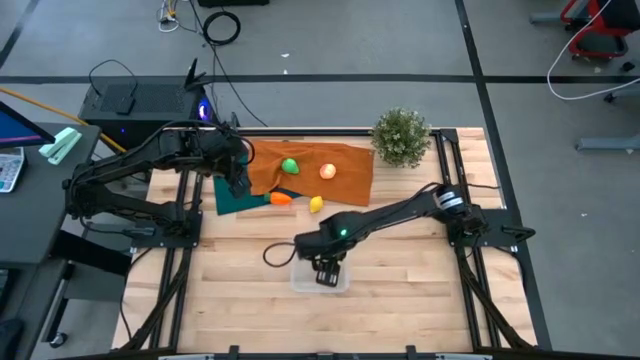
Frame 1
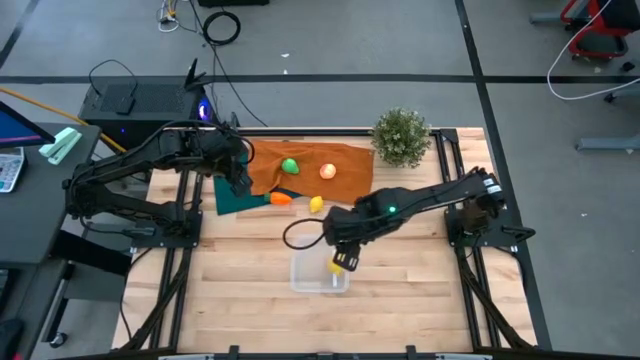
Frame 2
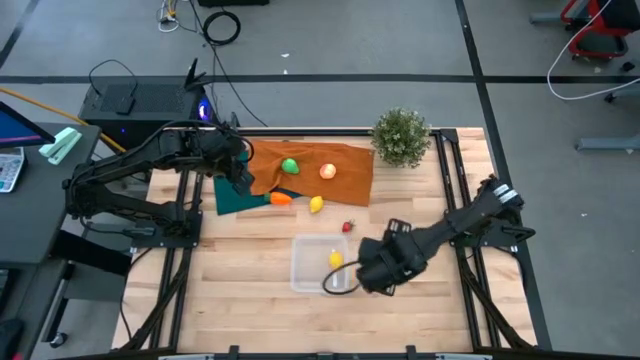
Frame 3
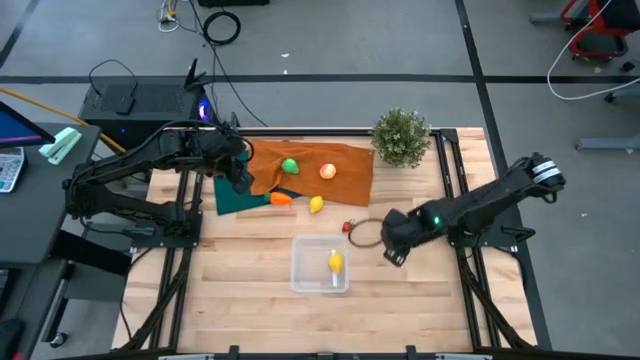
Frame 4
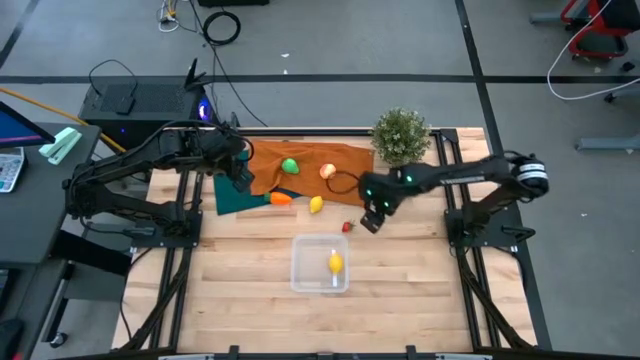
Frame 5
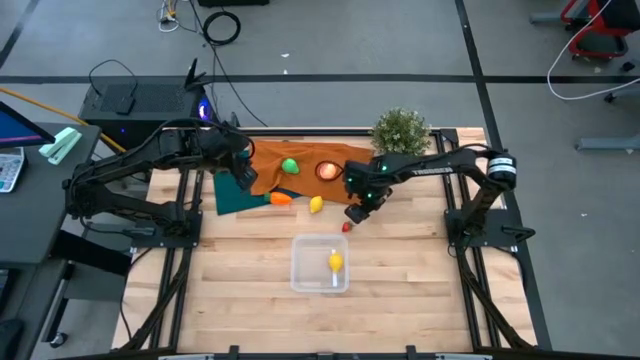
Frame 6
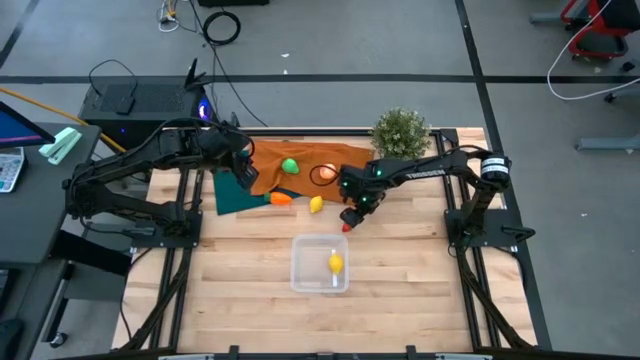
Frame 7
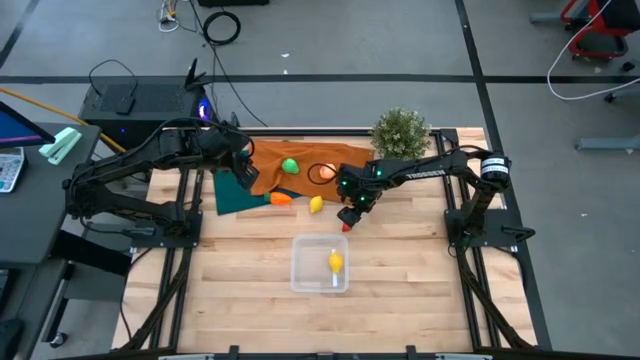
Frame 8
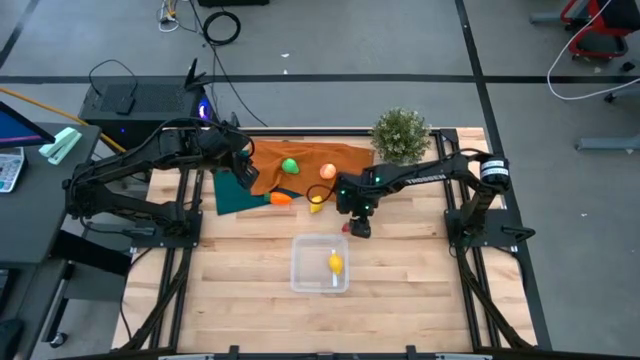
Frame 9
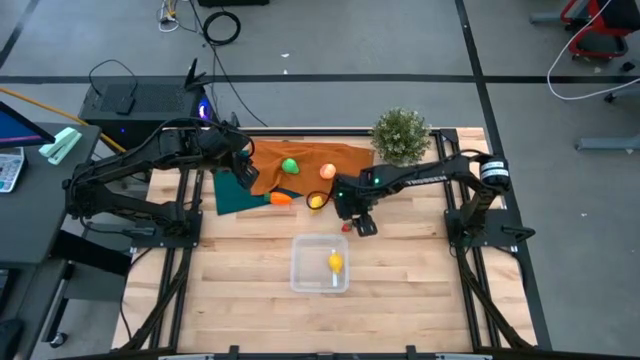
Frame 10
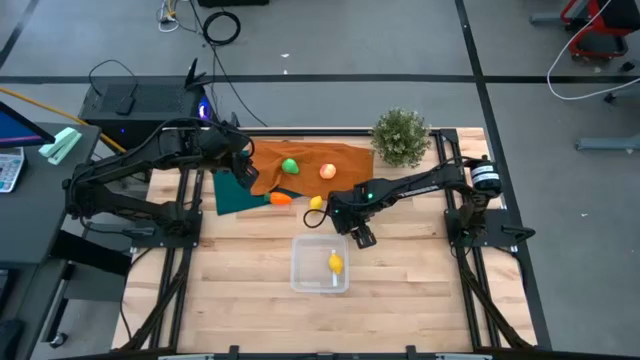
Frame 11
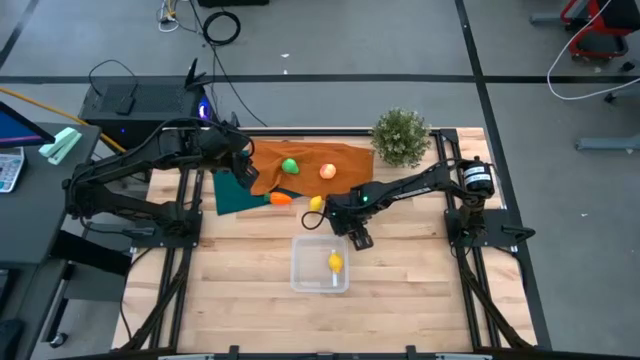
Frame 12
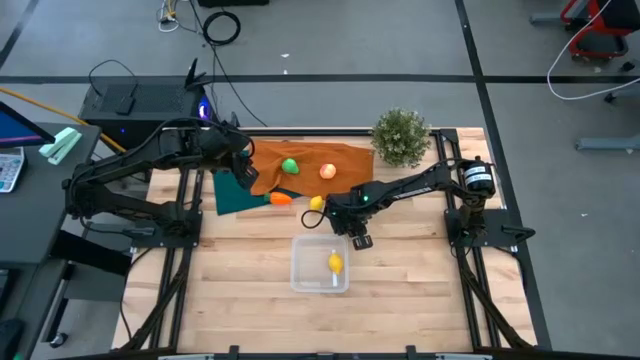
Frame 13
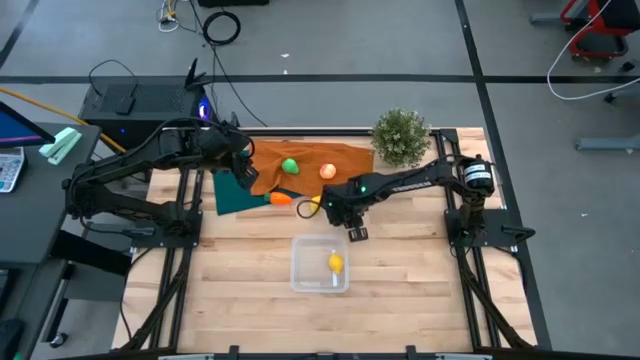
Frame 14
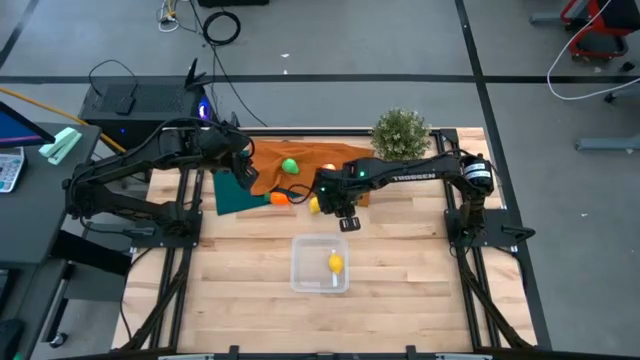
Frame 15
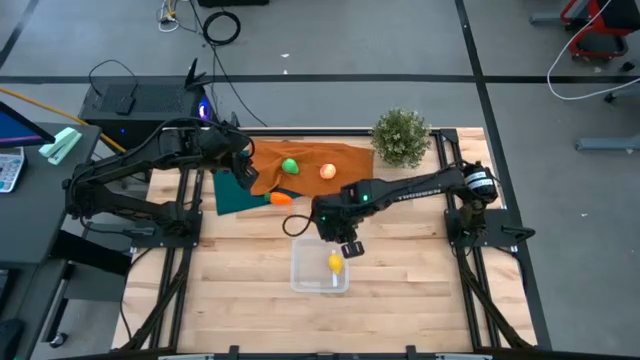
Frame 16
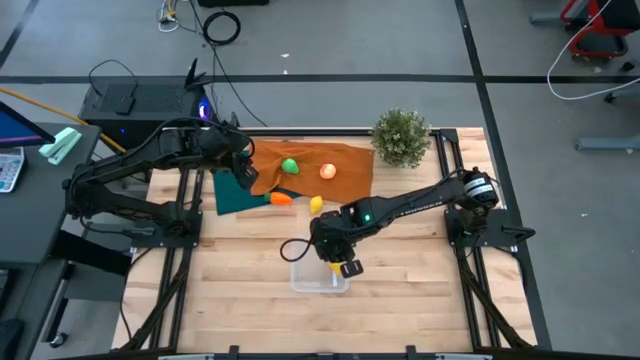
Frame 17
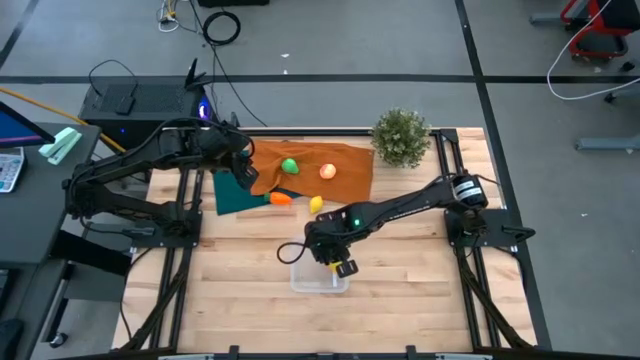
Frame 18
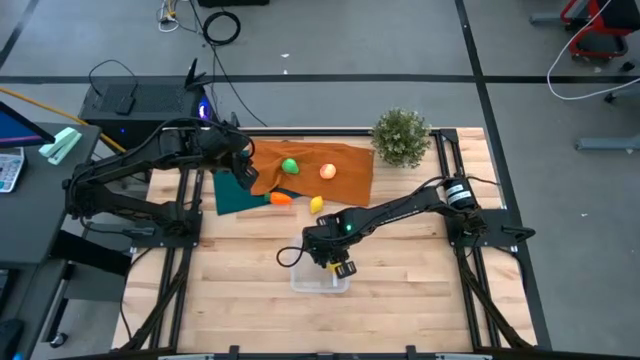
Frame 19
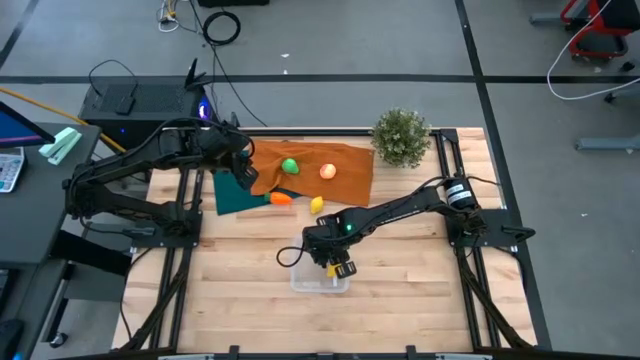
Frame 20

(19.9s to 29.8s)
Task: Pick and placing Produce into tupperware
Put the red strawberry into the transparent container

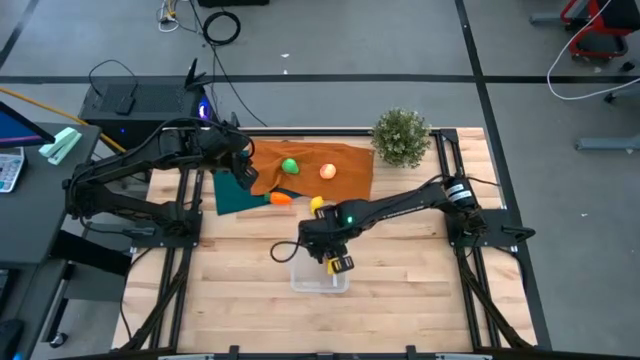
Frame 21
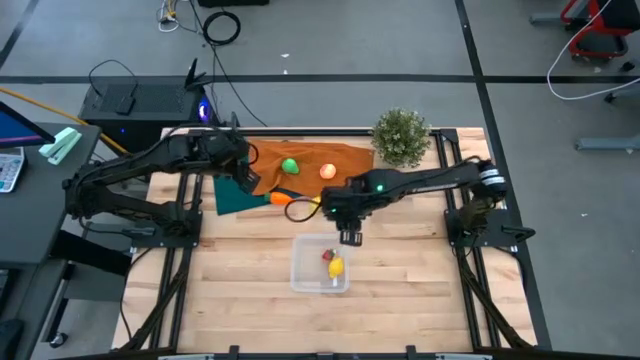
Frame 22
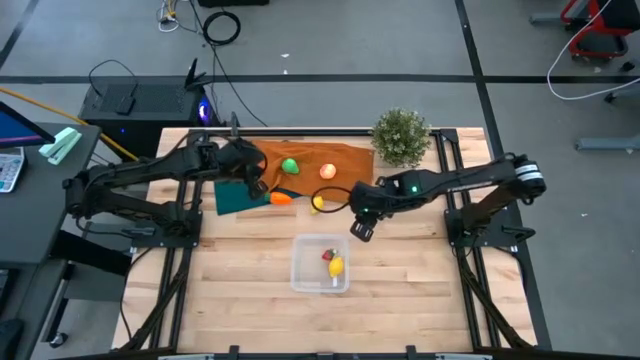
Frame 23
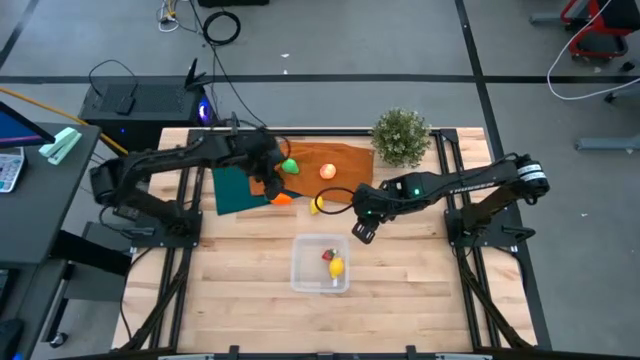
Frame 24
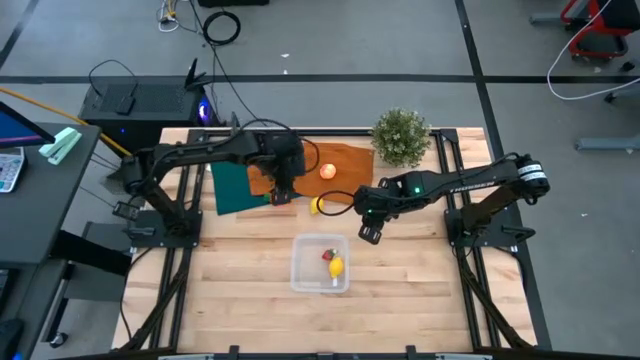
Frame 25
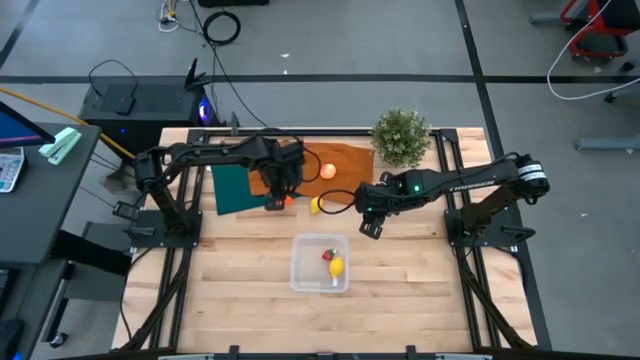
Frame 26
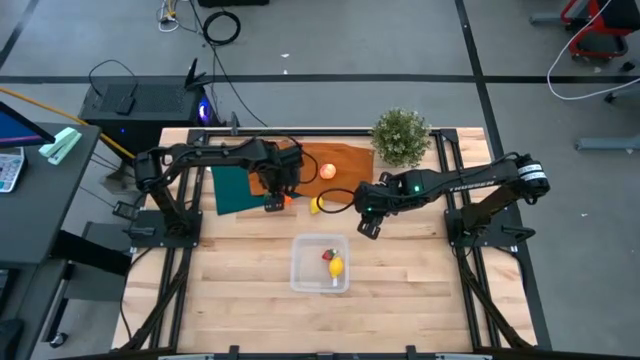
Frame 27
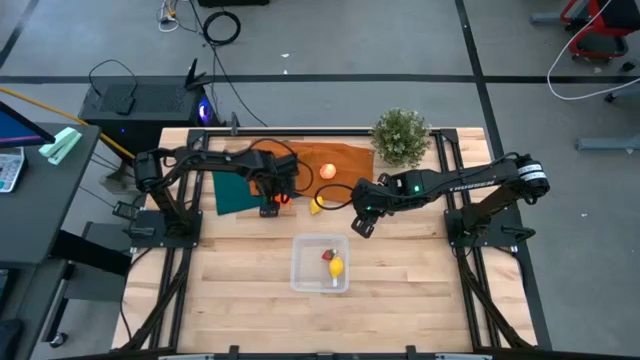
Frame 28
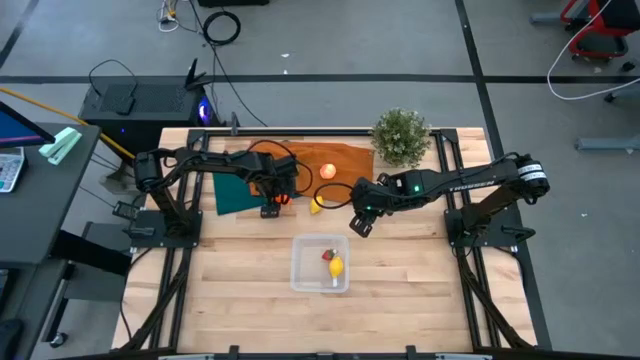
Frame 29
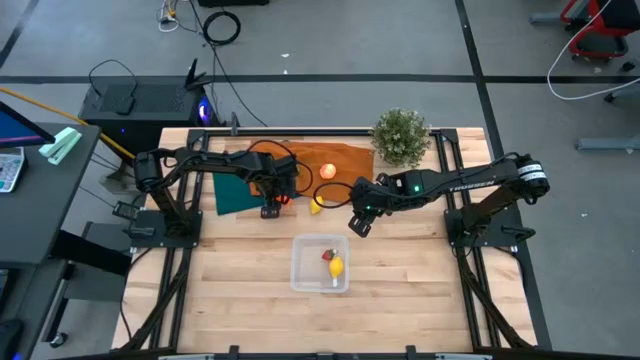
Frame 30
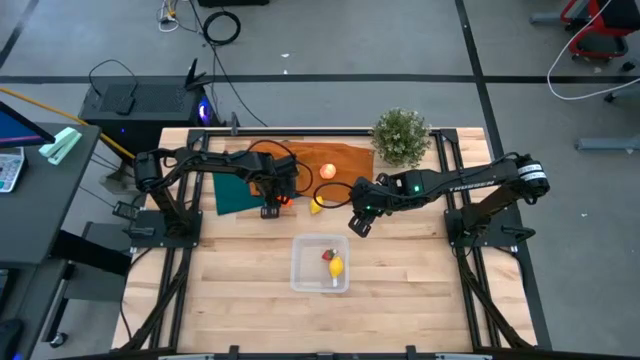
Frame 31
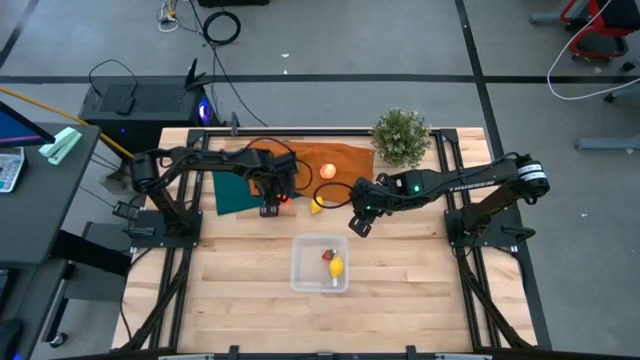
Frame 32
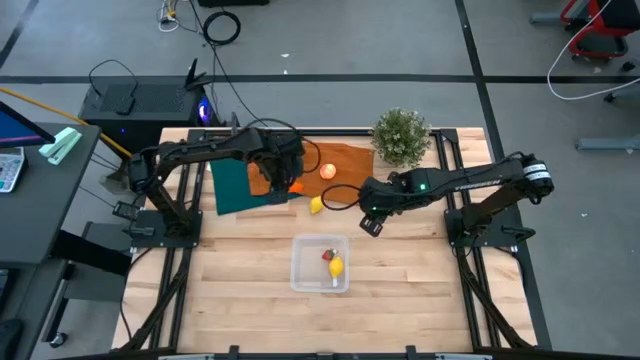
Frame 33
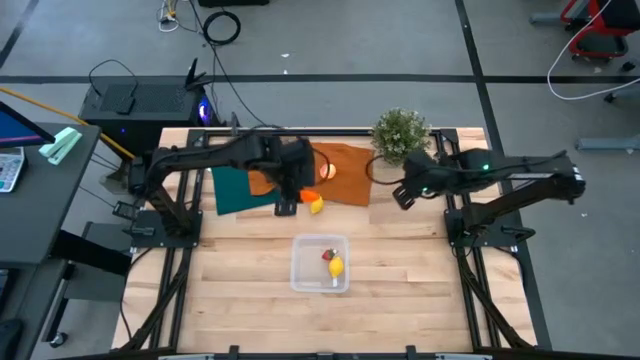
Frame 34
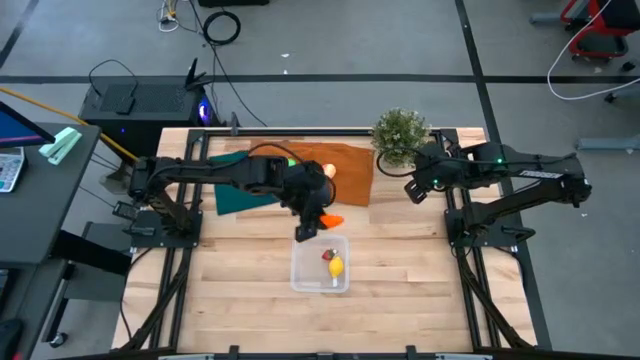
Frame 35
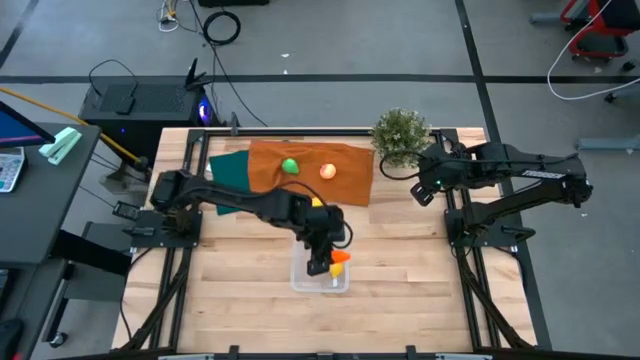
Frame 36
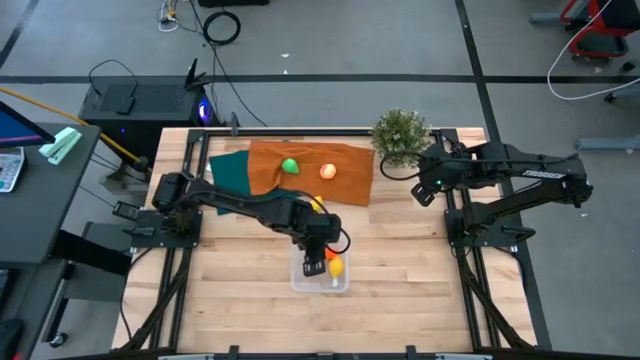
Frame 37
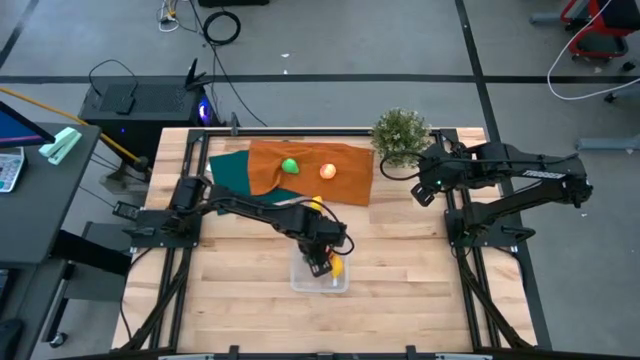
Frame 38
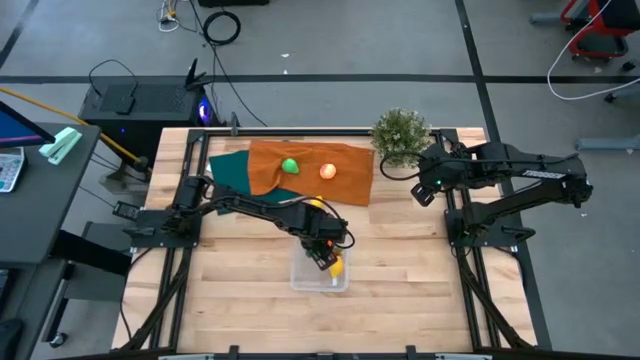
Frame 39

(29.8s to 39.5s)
Put the orange carrot into the transparent container

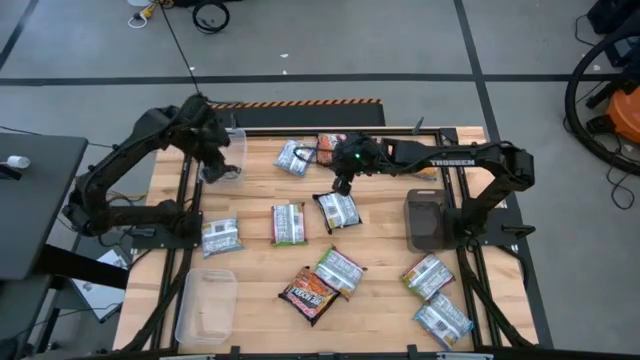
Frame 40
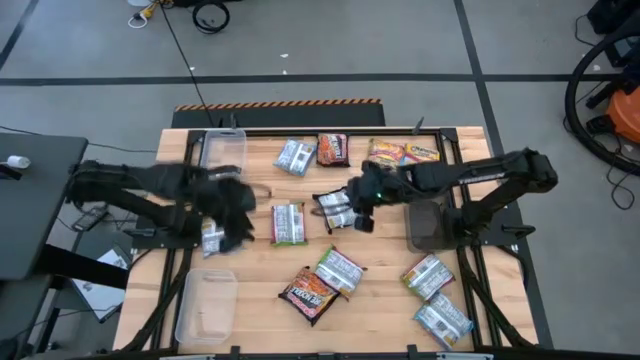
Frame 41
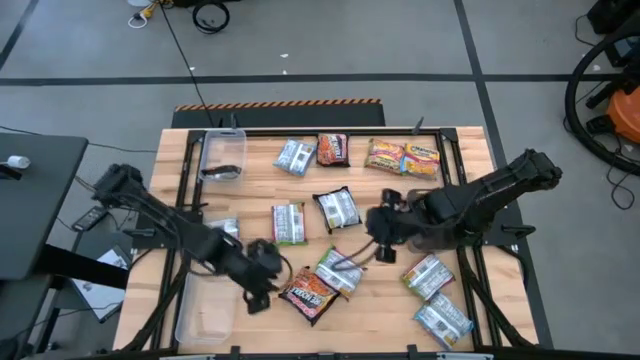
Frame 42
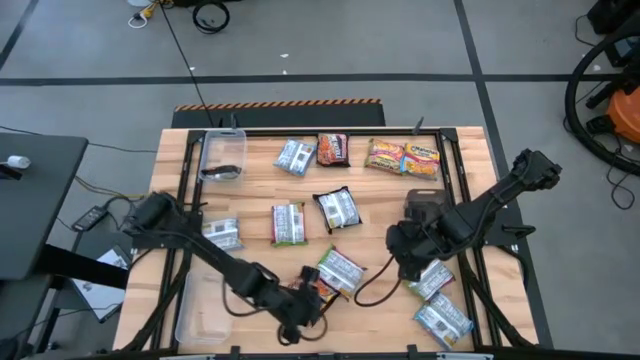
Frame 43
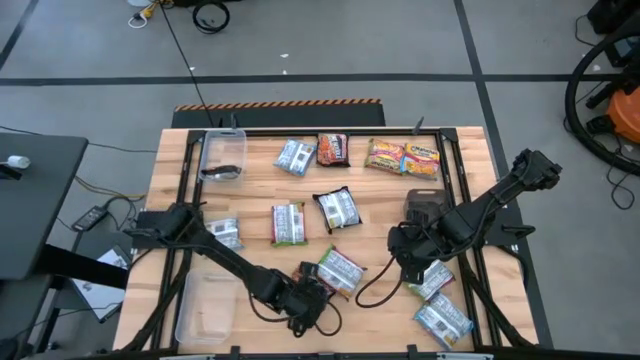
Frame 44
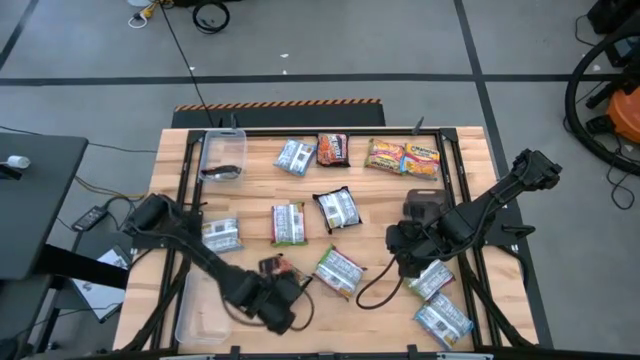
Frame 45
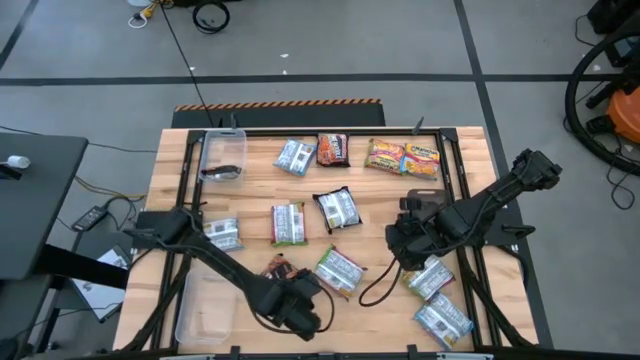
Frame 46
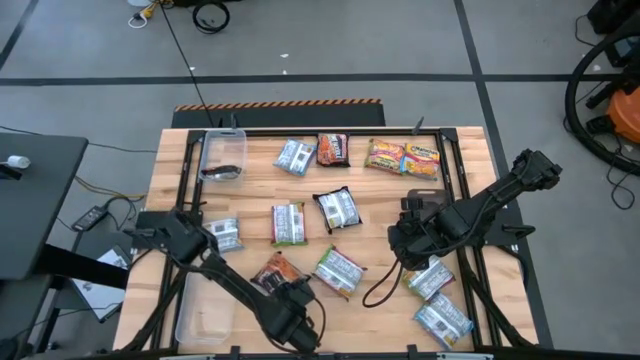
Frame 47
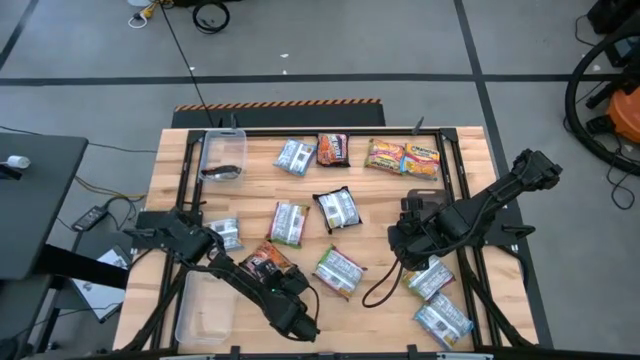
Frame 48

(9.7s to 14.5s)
Task: Sort Maruchan noodles
Put the black noodle pack into the top transparent bin
